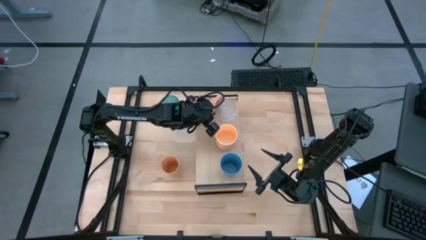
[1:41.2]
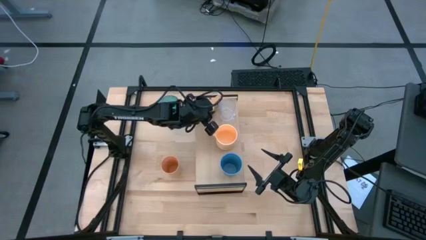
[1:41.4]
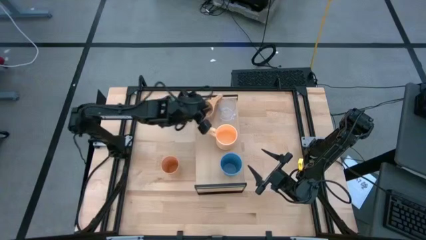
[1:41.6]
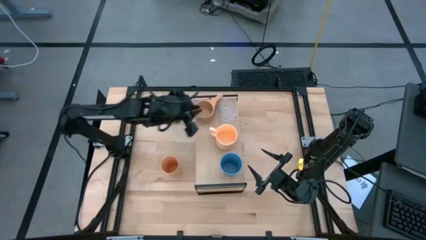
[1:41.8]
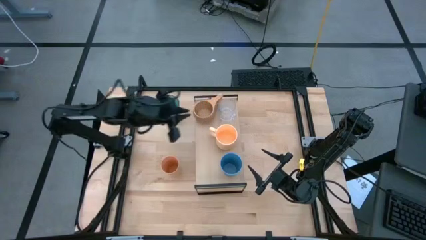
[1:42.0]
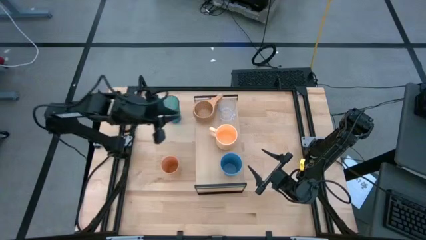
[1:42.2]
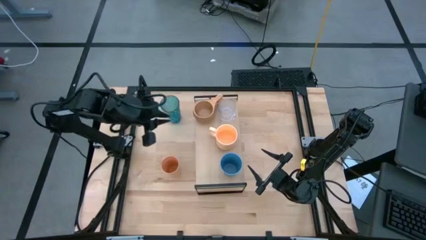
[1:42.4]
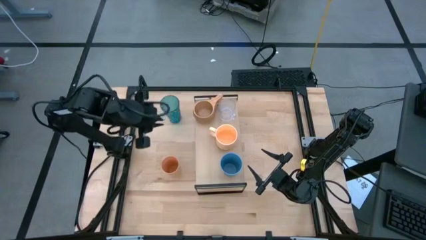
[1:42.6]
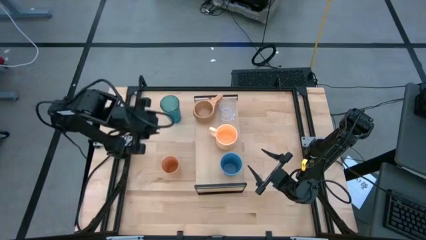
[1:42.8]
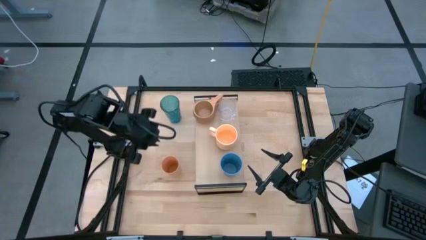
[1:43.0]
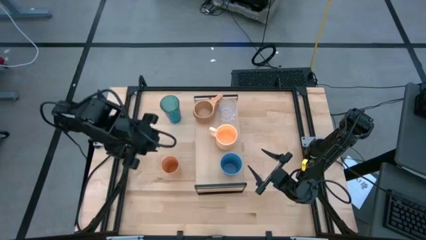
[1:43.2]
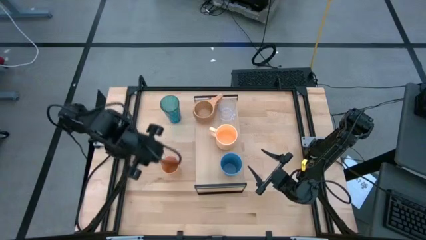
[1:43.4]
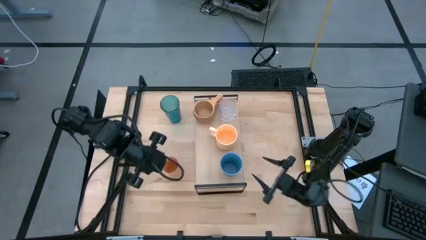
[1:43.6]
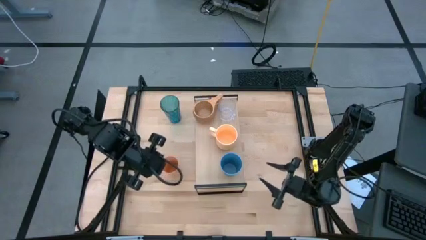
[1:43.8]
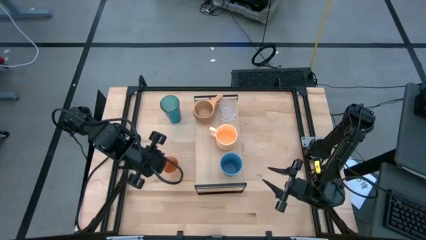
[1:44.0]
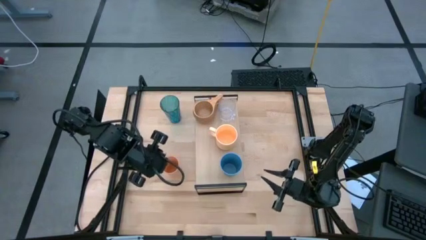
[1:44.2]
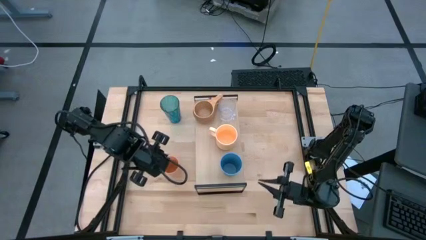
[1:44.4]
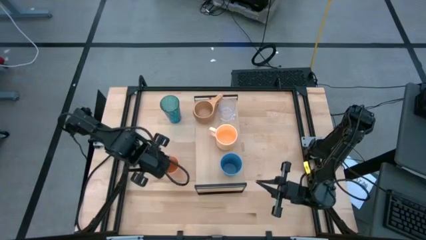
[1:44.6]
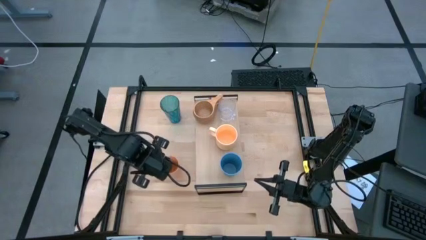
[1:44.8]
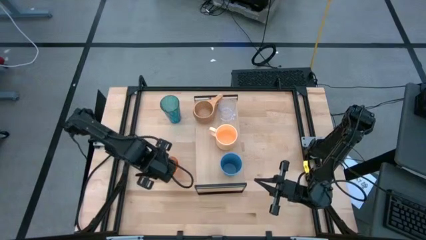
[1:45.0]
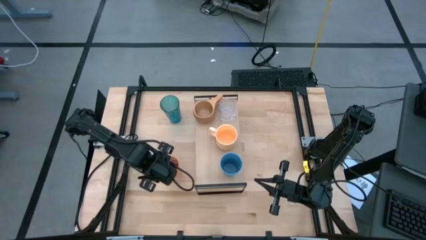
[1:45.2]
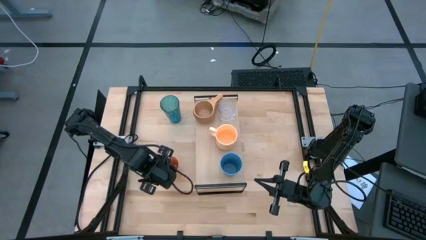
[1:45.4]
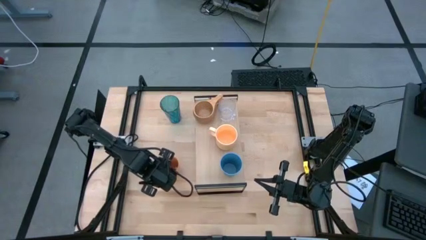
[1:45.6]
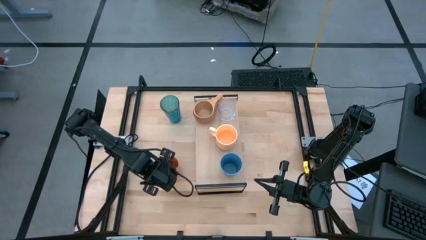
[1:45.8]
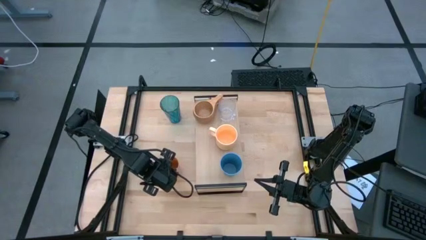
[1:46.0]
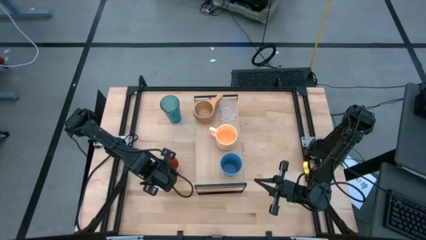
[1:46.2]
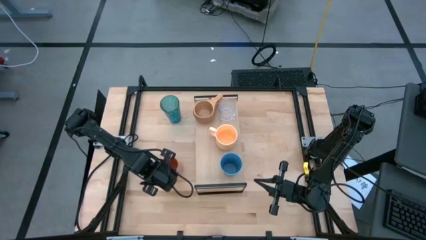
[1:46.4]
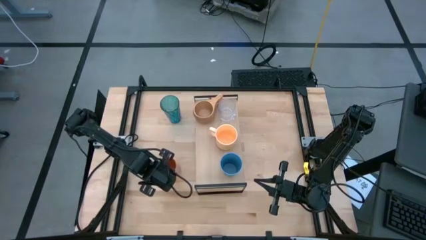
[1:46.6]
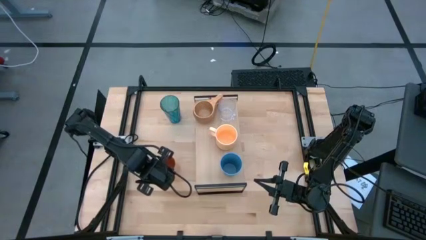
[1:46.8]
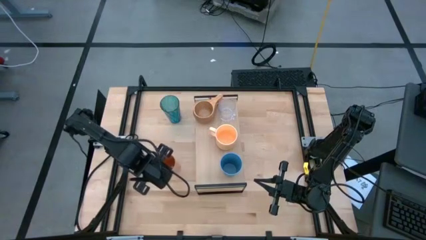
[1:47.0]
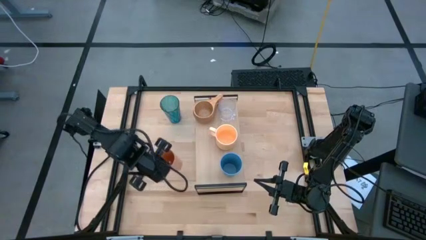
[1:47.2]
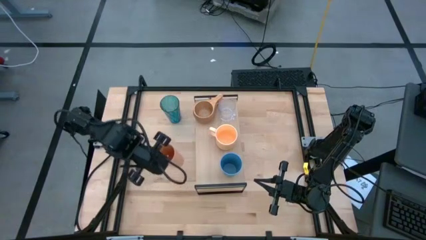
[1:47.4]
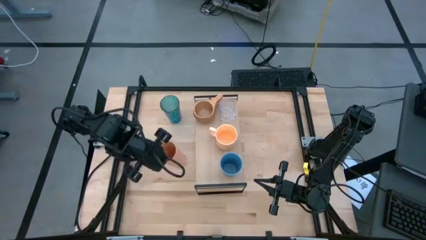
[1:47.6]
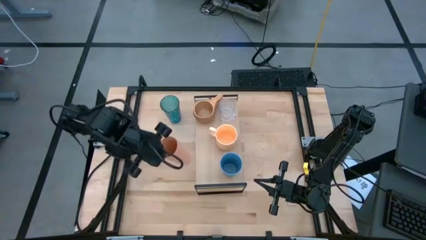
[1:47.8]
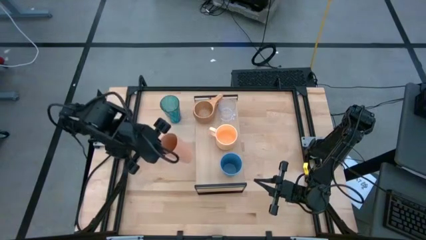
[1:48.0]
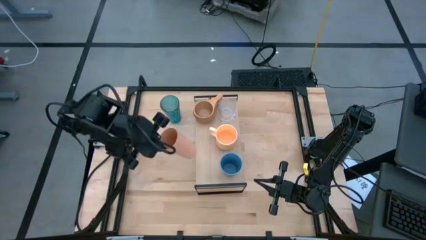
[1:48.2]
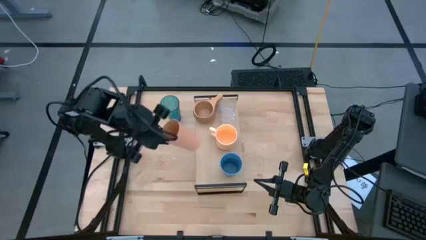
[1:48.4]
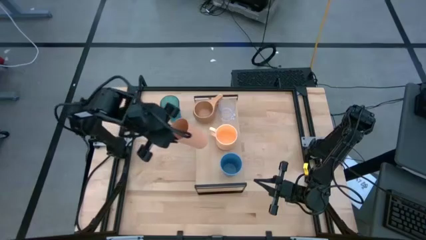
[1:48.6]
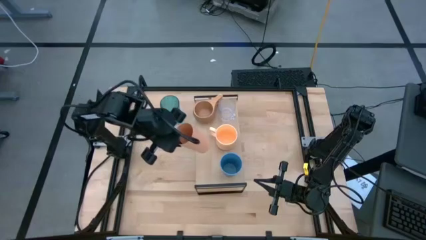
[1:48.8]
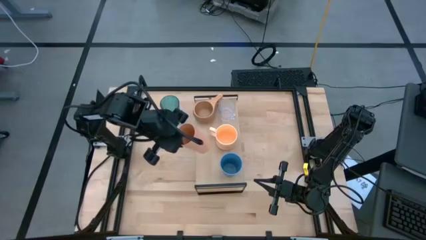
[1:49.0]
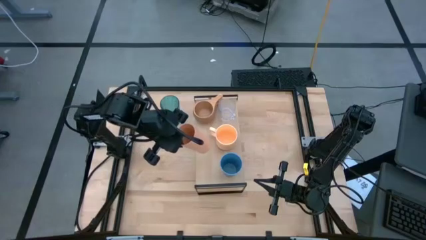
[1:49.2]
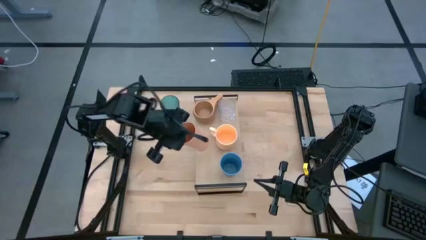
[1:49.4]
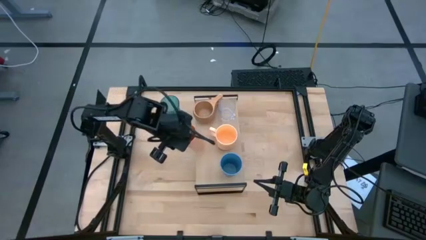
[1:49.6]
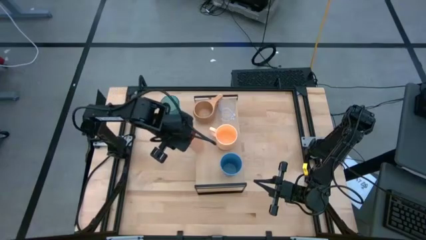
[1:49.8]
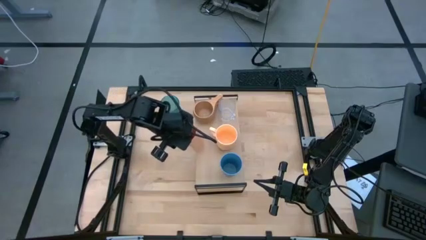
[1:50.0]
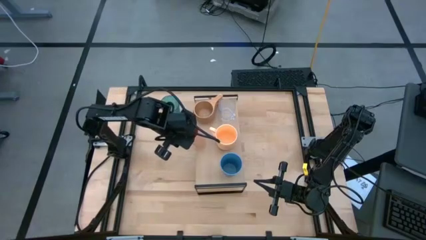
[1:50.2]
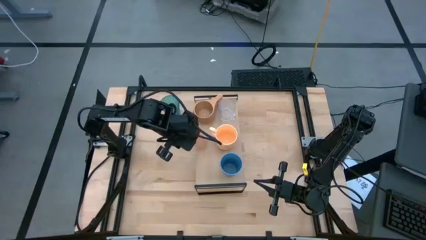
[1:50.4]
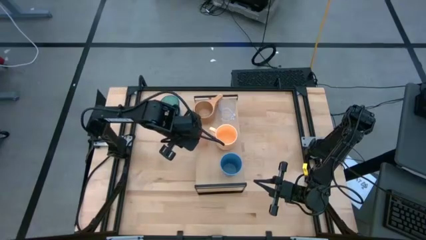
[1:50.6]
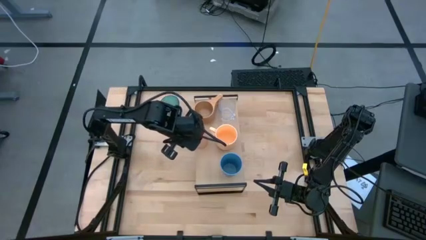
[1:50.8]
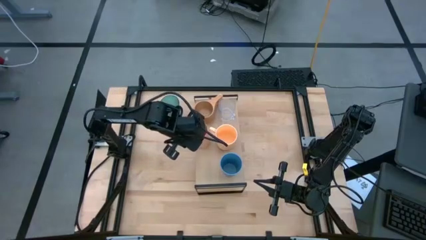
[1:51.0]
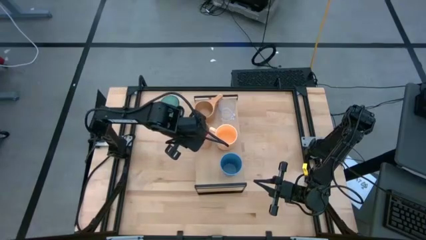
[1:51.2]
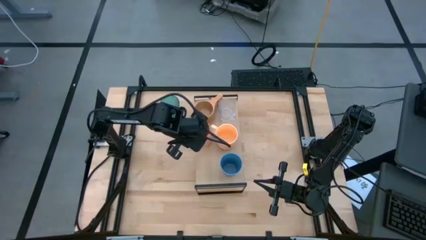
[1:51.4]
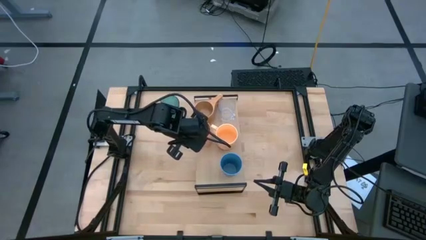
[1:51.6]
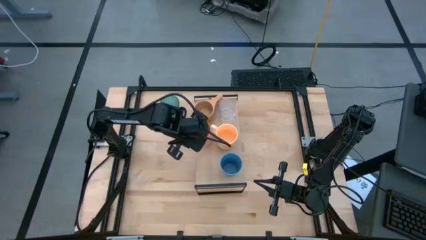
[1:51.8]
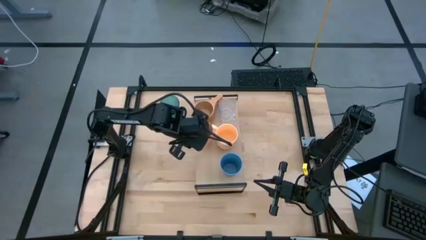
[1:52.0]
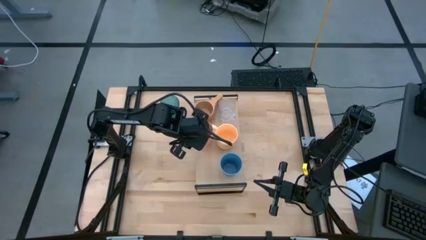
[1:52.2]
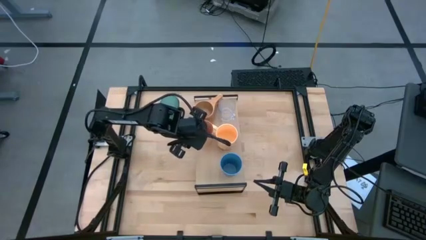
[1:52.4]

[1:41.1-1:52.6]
Task: Stack small to large cups/mugs on shelf
Put the orange cup on the shelf

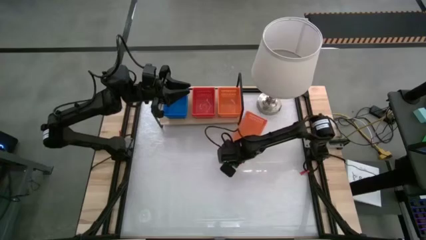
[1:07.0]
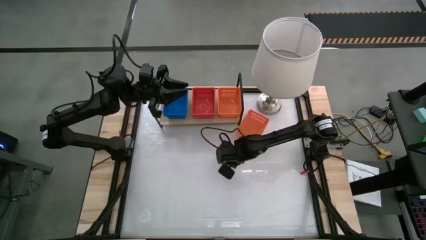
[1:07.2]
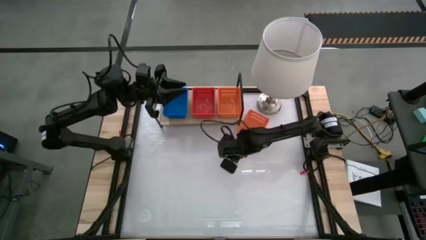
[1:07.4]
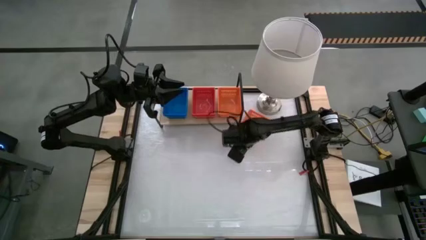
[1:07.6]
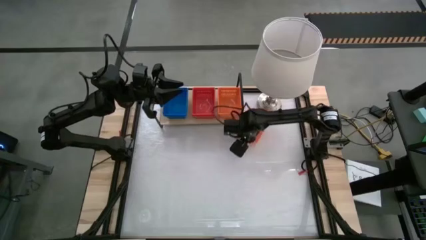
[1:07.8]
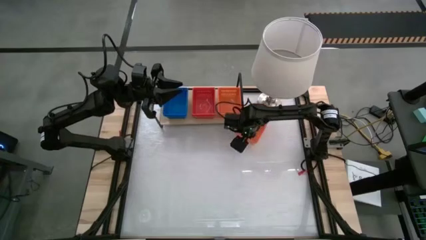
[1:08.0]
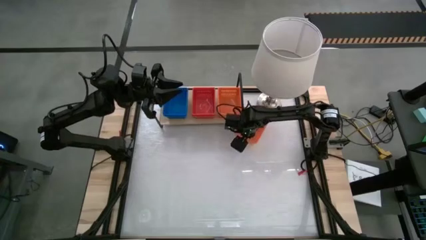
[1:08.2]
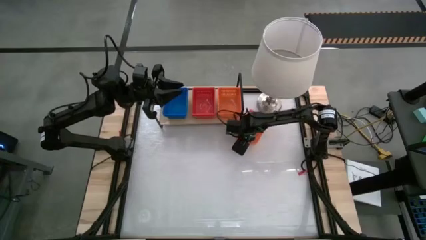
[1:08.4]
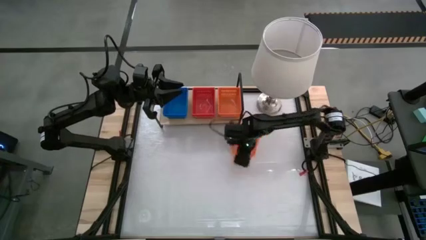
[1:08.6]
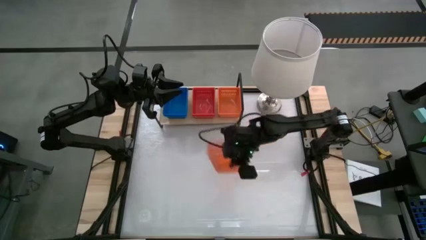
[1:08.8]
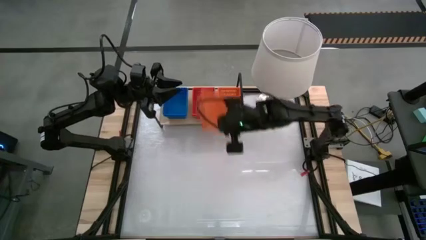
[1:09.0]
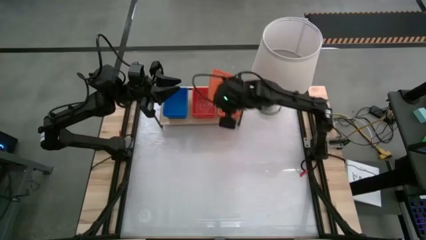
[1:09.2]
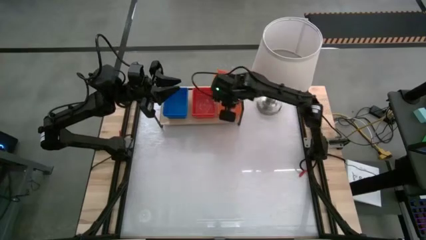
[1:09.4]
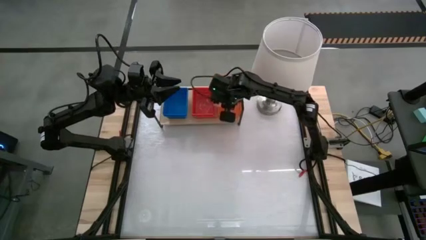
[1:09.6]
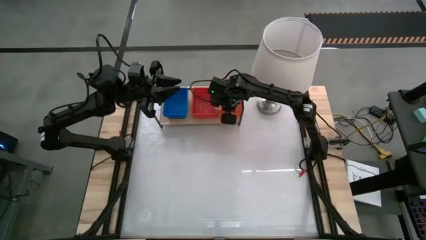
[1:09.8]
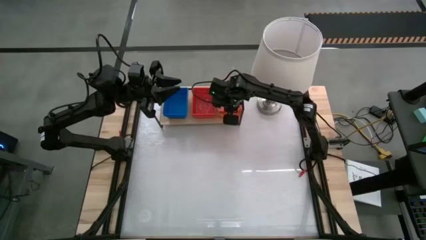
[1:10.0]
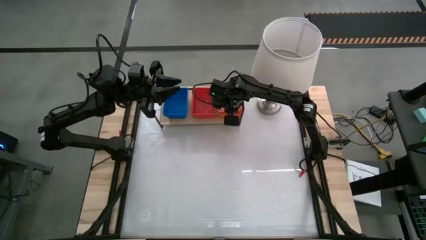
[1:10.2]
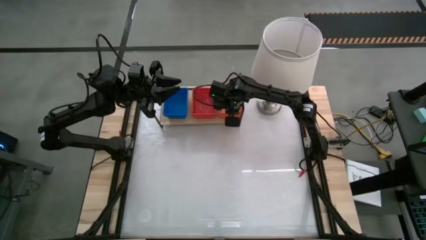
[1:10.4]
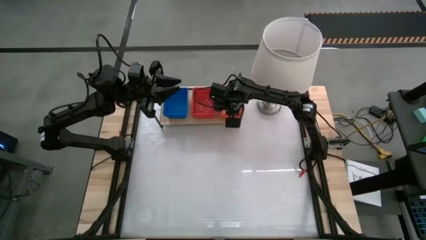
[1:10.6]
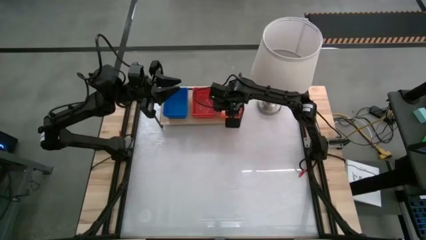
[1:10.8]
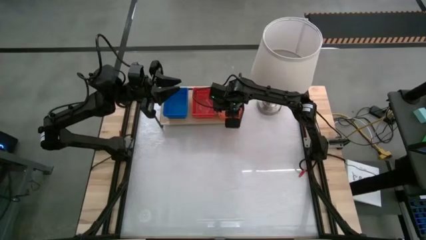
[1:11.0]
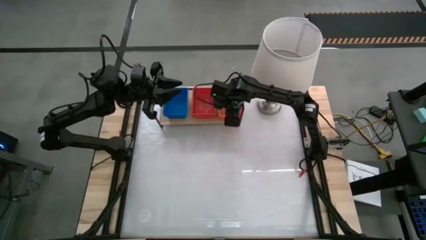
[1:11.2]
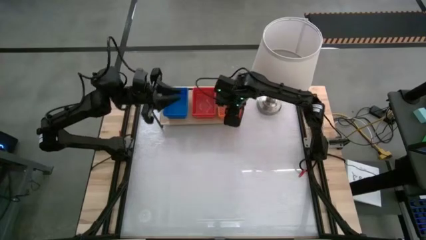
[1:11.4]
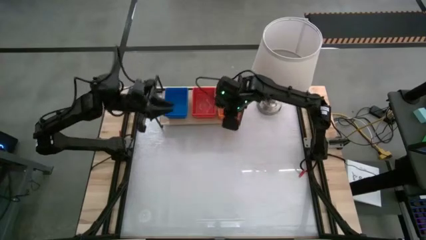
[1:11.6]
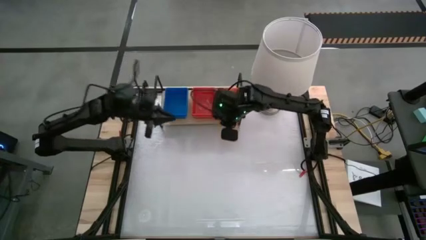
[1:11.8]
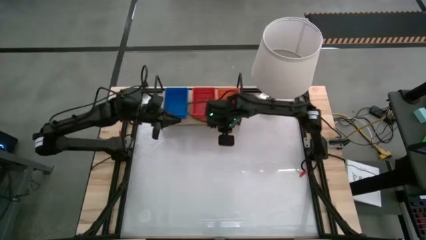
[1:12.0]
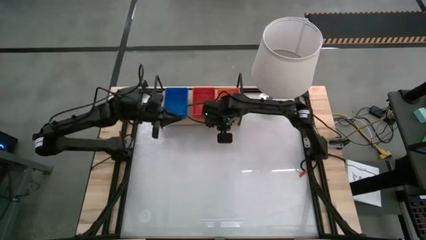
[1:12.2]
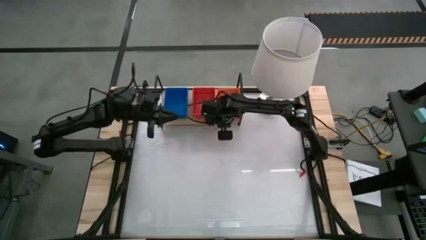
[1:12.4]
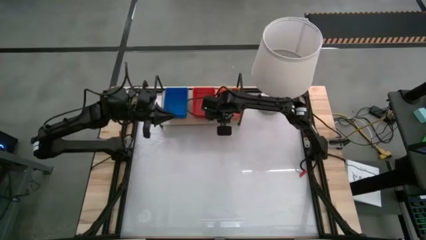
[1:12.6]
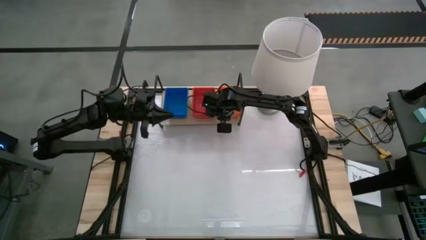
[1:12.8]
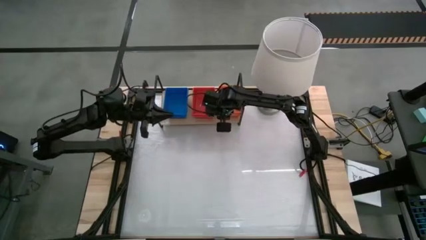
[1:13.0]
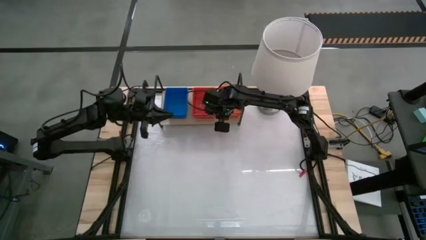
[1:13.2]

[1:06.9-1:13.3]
Task: Stack baskets on shelf by color
Stack the orange basket on top of the stack orange bins on the shelf
